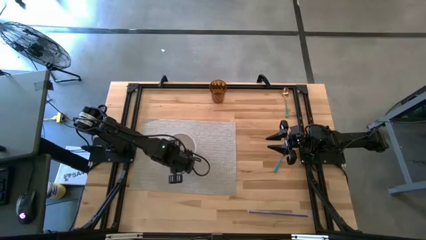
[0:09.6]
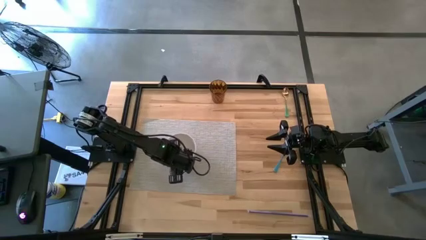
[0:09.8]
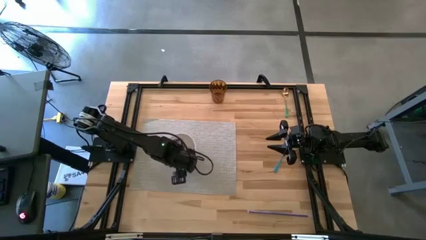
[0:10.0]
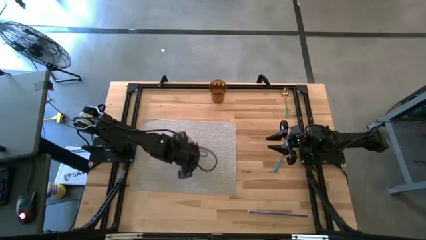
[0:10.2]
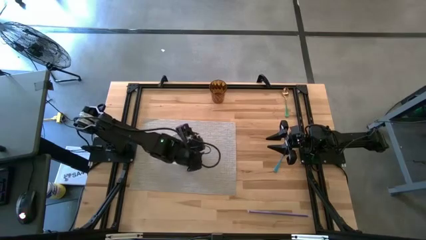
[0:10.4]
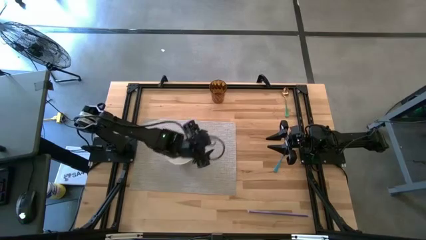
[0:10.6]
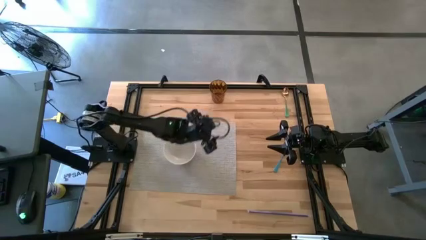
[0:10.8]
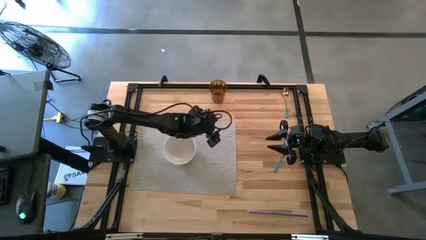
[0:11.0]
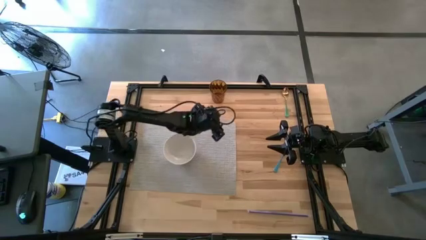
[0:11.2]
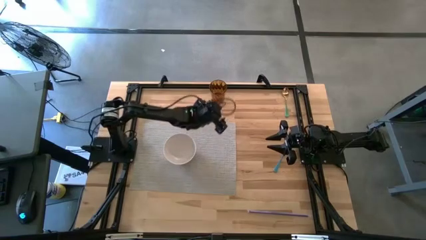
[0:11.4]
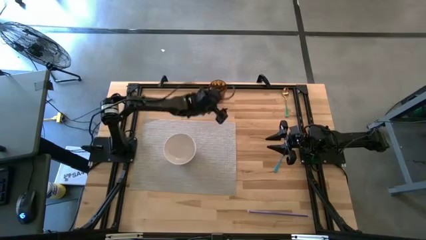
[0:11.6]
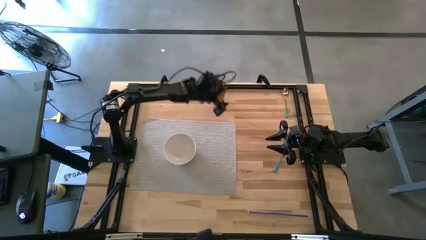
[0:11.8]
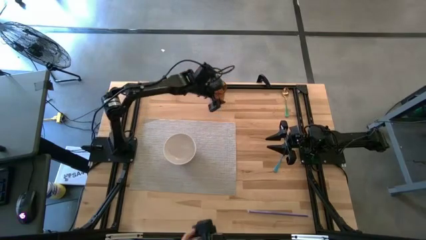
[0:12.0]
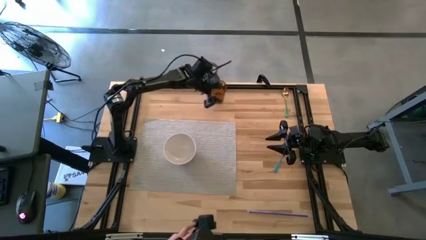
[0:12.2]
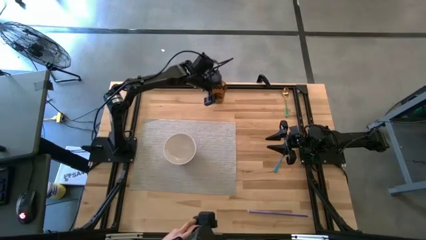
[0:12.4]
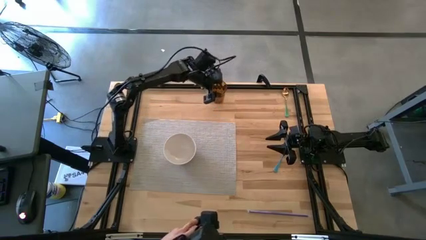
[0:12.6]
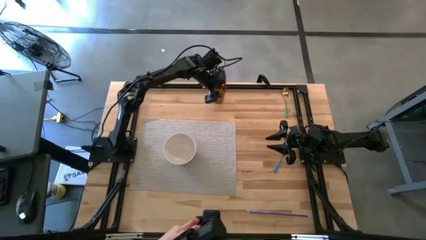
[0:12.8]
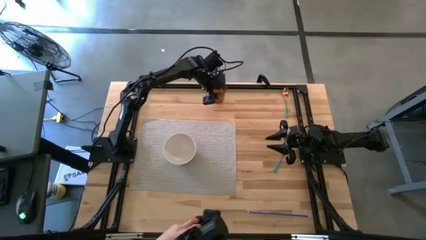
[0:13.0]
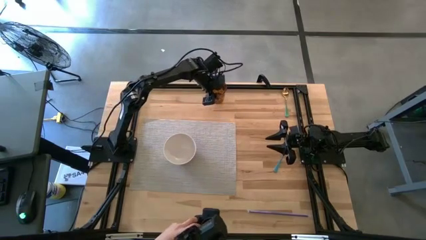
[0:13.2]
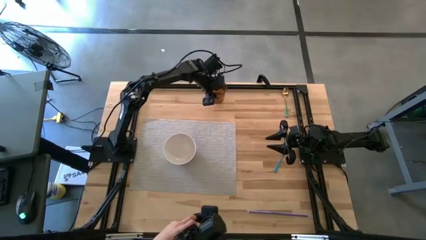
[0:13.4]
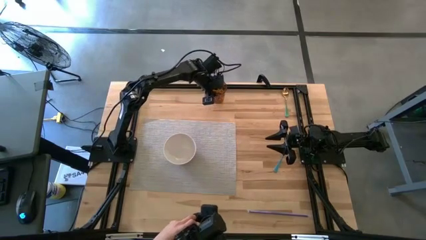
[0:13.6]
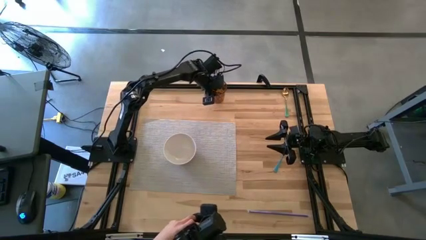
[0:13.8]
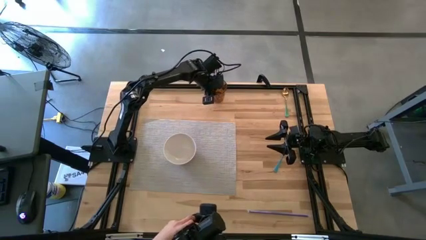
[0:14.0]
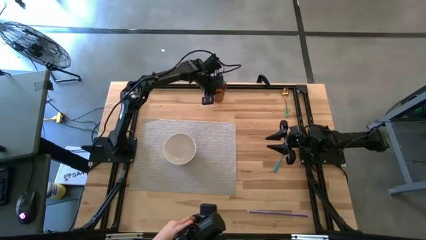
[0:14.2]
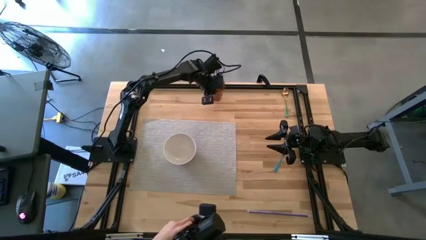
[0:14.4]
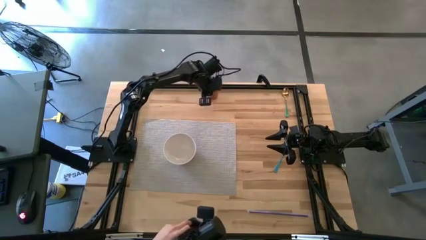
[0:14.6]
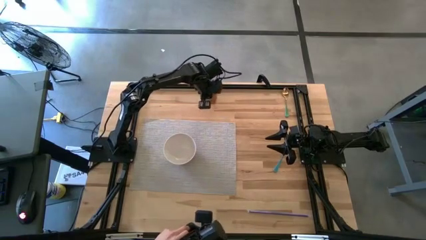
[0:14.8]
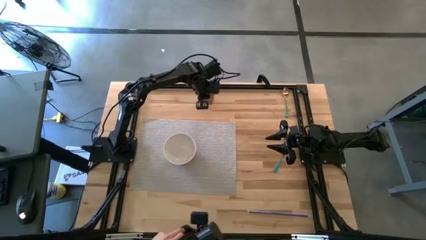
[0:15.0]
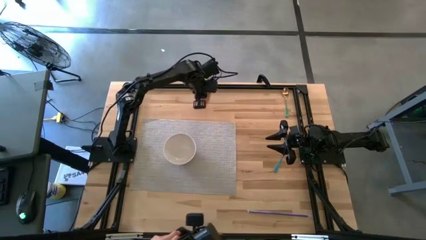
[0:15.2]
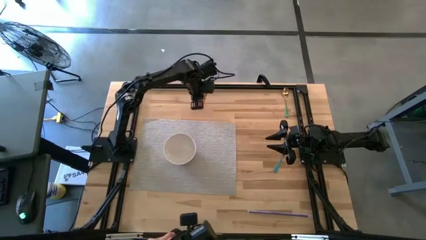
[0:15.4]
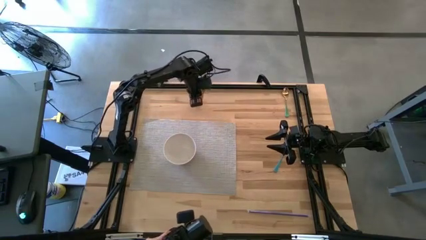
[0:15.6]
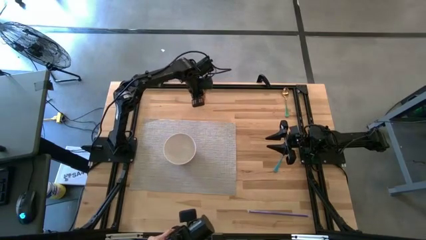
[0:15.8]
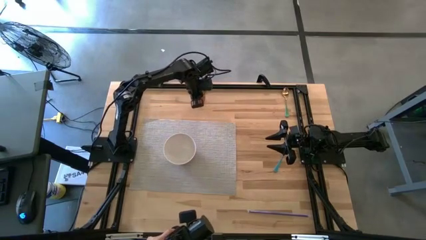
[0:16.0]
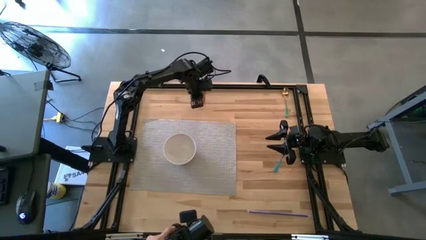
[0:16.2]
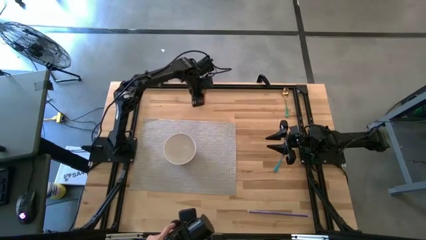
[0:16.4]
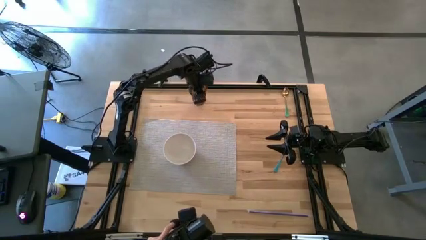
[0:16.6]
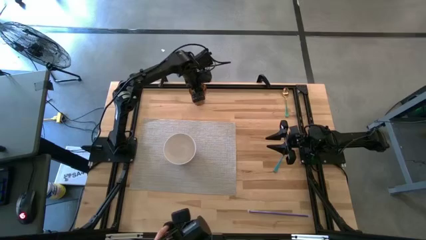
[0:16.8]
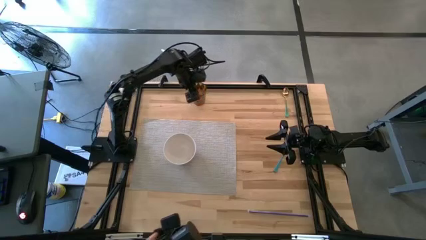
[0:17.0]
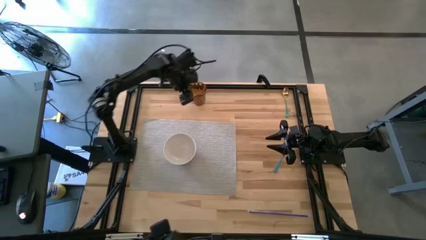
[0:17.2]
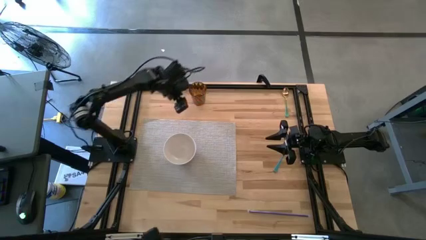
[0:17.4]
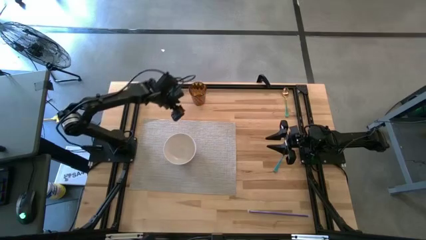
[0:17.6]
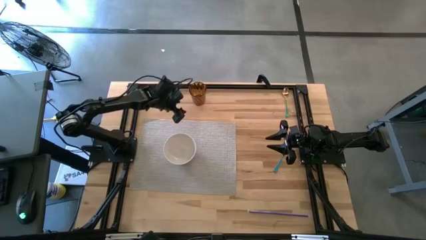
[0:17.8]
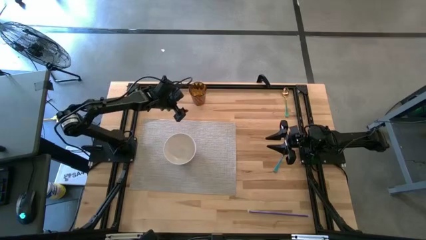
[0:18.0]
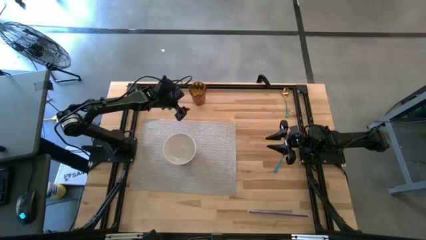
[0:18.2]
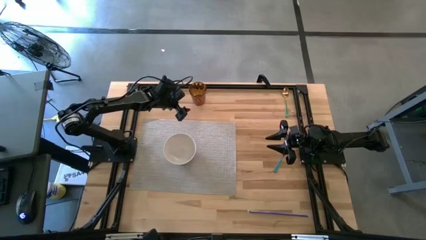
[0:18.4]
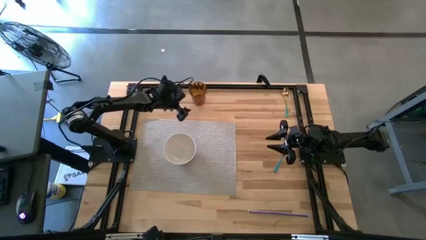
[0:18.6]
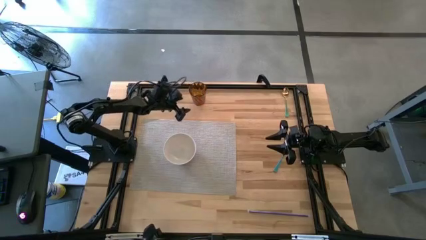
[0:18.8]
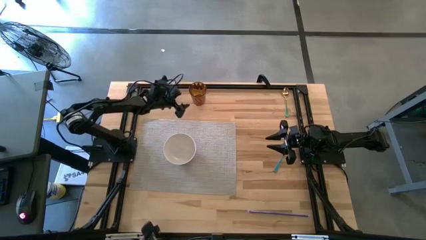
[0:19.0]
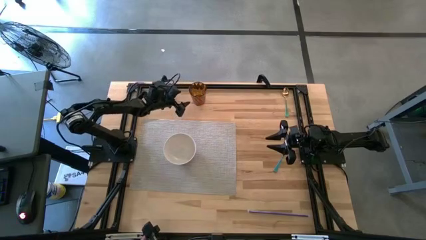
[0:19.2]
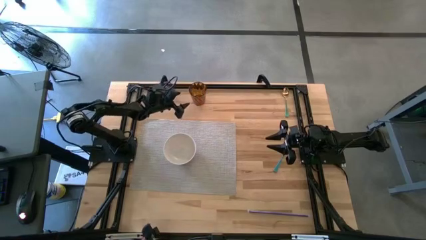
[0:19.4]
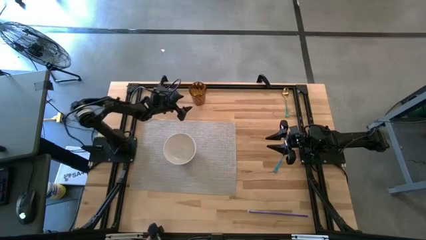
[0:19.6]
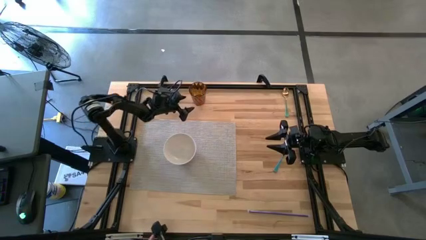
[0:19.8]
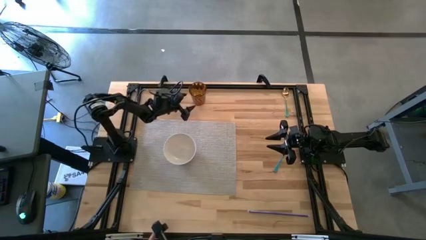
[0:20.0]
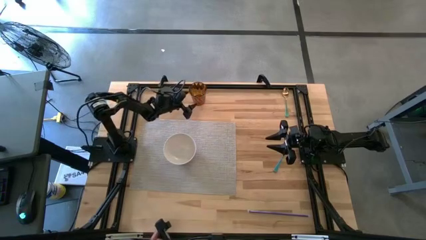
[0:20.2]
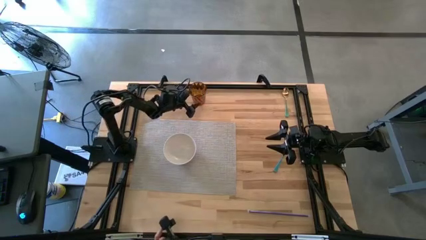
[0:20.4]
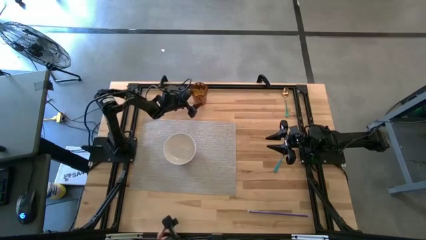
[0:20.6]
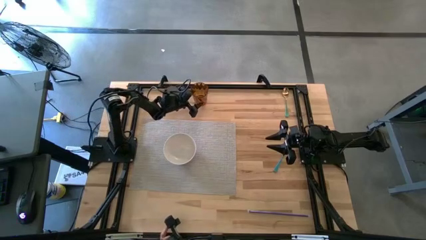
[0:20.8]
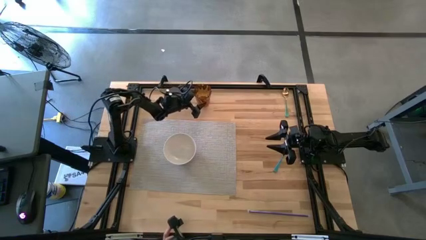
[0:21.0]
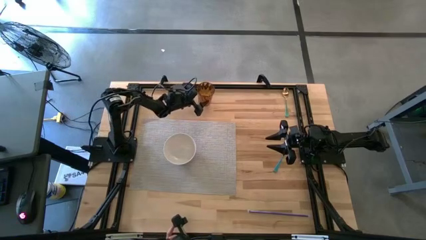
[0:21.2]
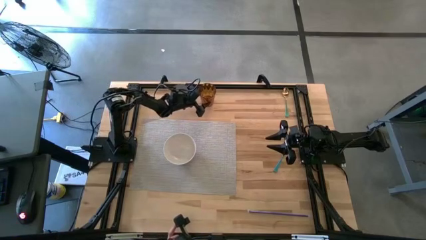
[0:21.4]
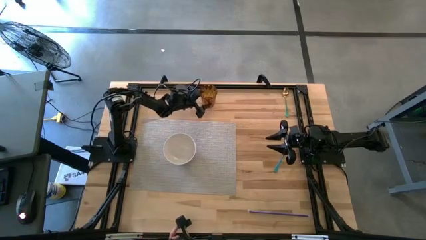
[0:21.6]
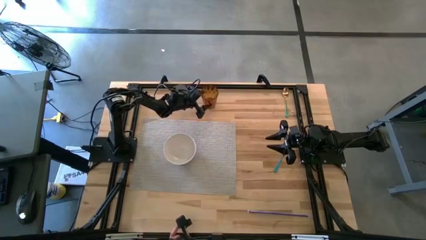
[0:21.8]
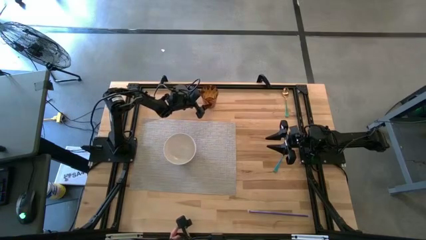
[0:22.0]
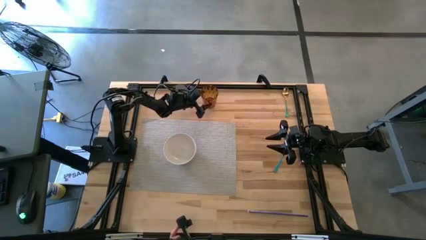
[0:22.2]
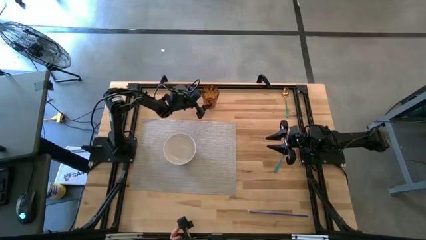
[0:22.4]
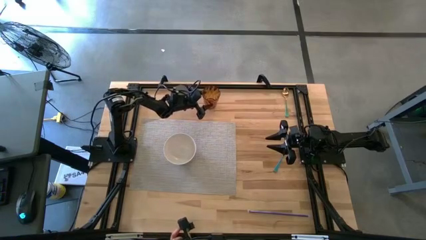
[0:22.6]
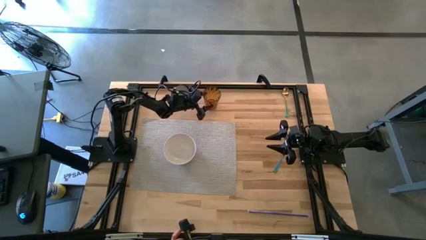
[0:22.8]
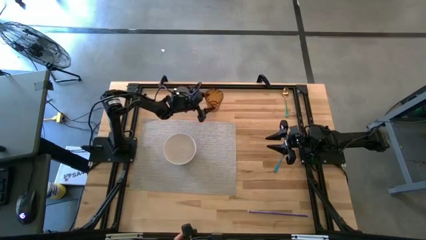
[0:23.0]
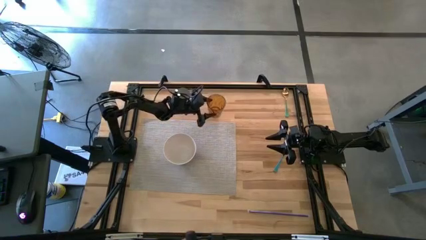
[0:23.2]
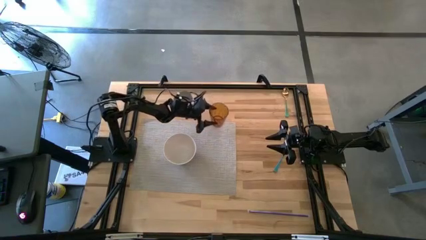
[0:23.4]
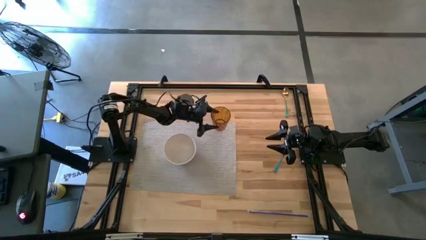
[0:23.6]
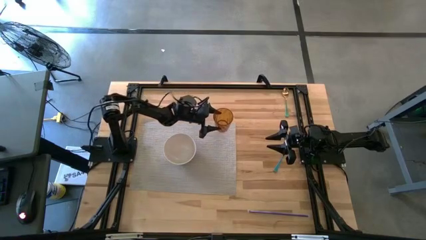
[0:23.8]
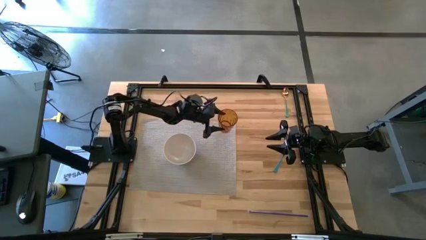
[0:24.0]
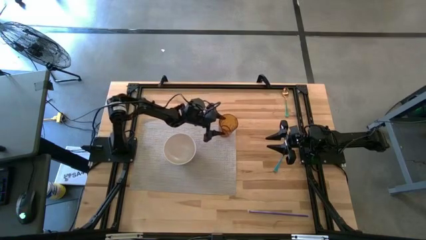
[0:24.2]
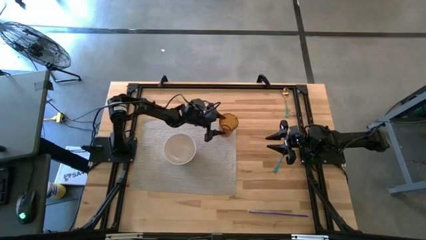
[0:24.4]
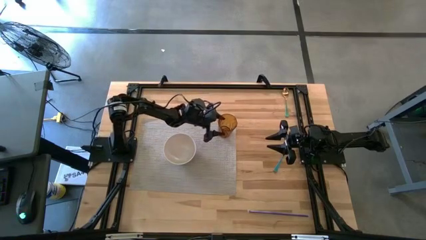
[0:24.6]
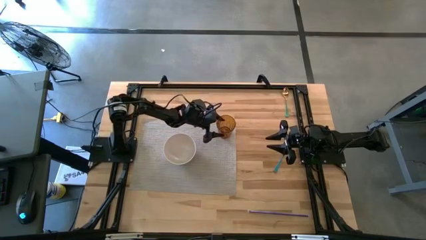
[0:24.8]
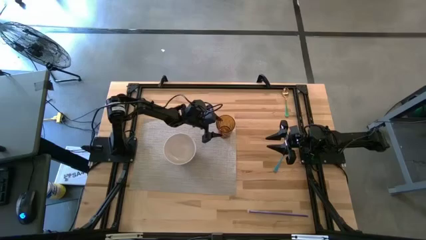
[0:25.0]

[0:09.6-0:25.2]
Task: Pick & Place Utensil
Put the orange cup on the gray mat to the top right of the white bowl
